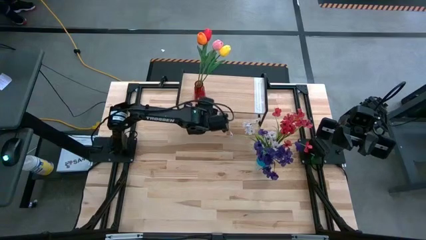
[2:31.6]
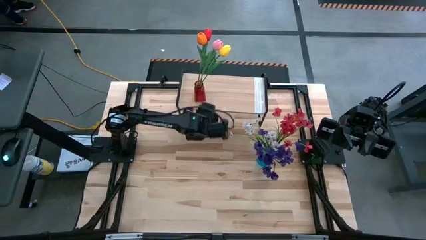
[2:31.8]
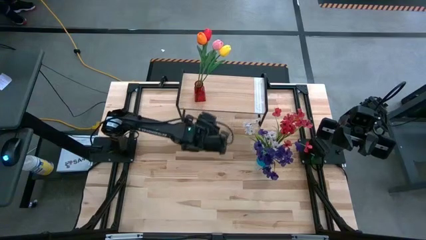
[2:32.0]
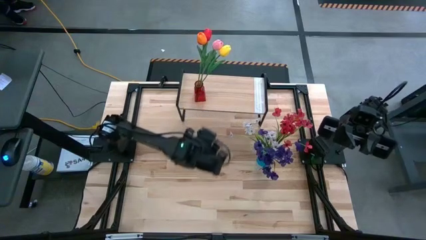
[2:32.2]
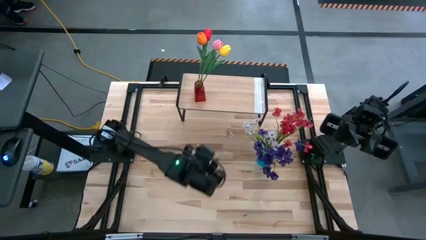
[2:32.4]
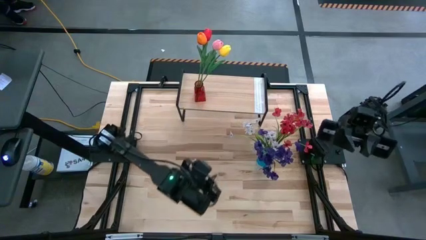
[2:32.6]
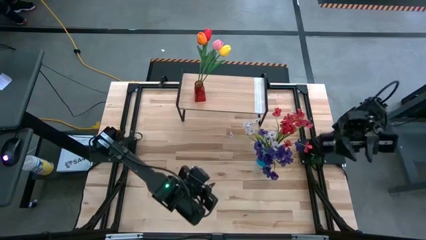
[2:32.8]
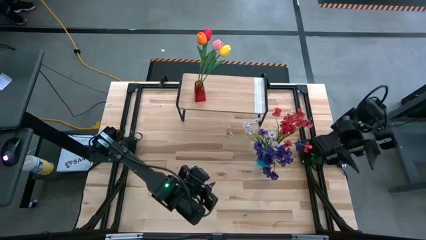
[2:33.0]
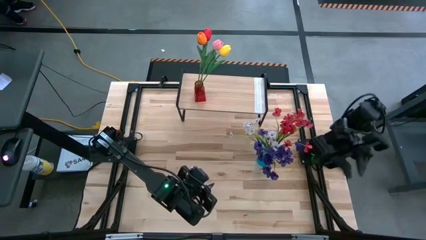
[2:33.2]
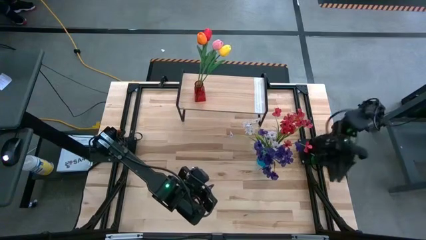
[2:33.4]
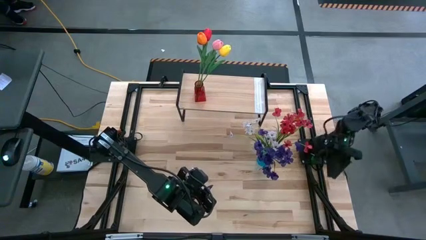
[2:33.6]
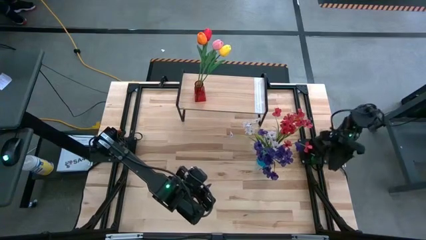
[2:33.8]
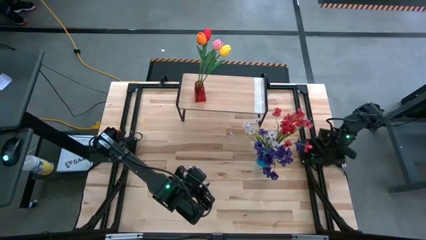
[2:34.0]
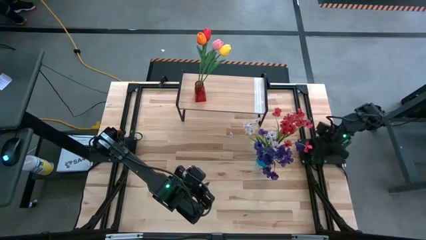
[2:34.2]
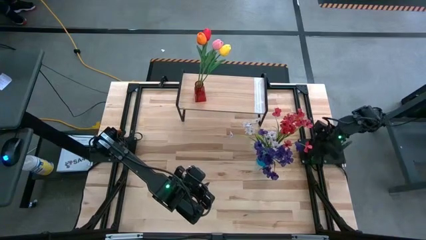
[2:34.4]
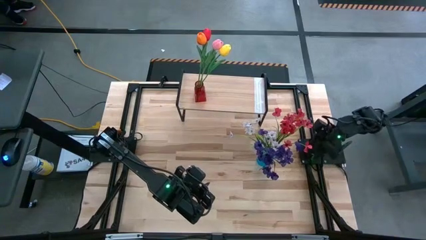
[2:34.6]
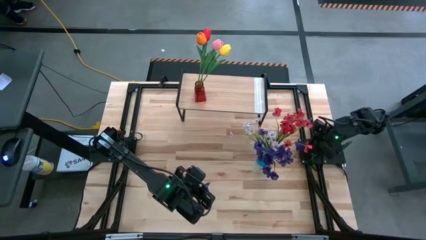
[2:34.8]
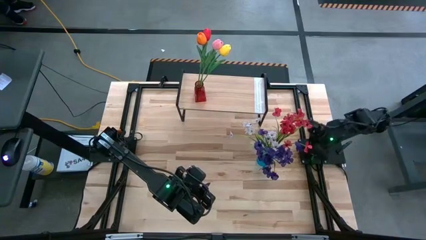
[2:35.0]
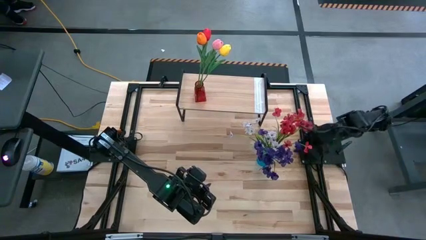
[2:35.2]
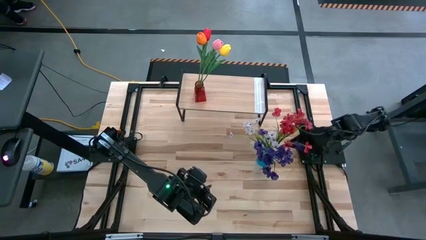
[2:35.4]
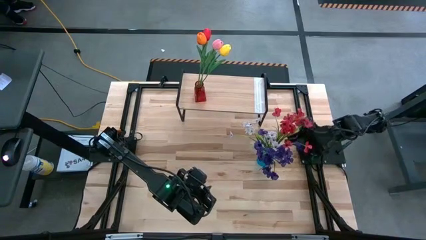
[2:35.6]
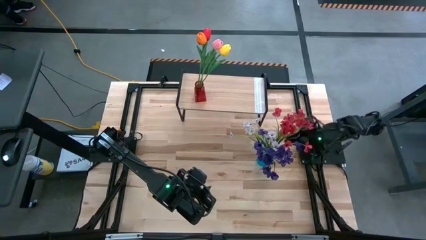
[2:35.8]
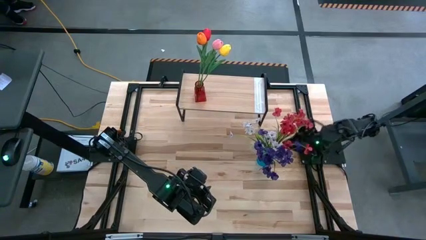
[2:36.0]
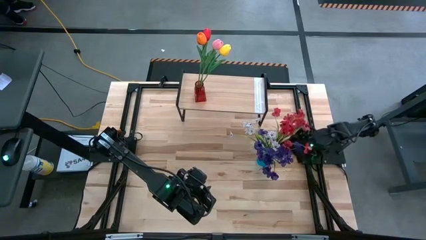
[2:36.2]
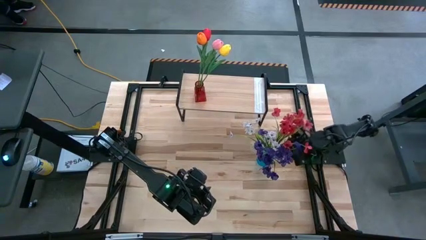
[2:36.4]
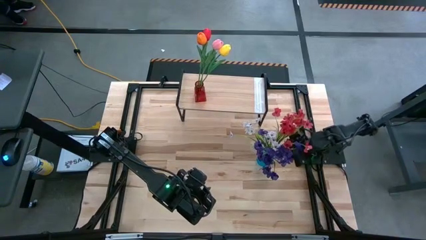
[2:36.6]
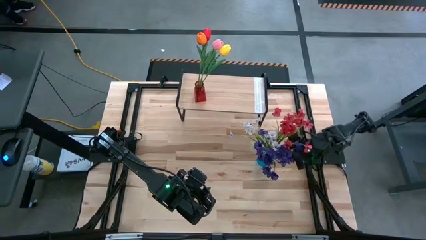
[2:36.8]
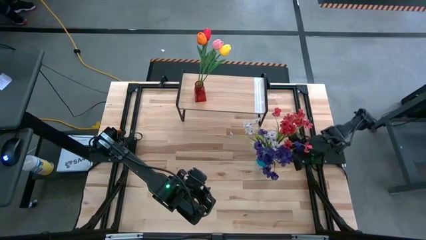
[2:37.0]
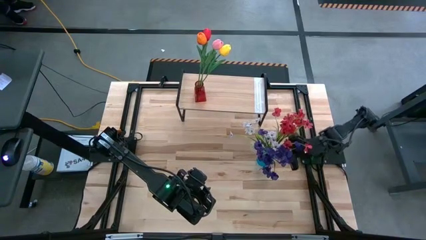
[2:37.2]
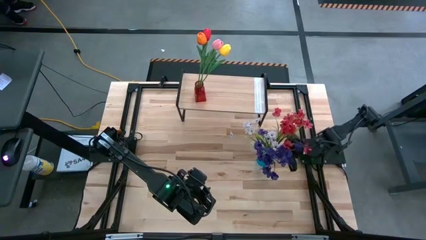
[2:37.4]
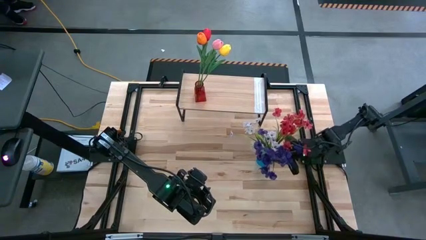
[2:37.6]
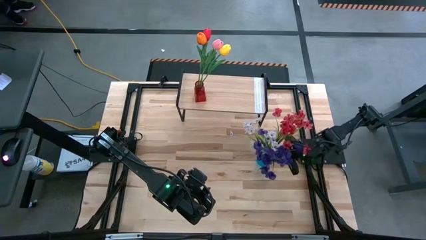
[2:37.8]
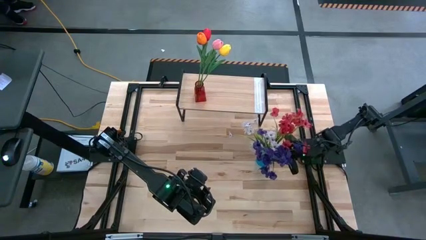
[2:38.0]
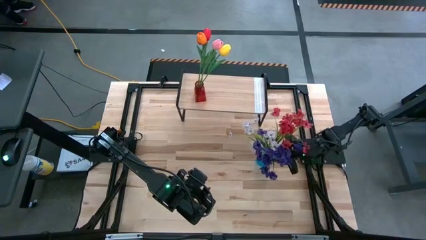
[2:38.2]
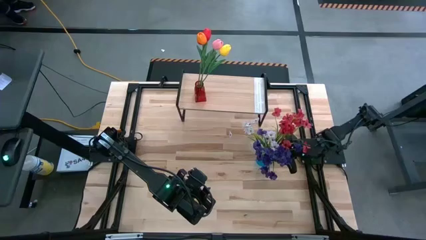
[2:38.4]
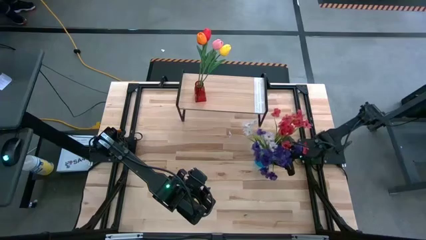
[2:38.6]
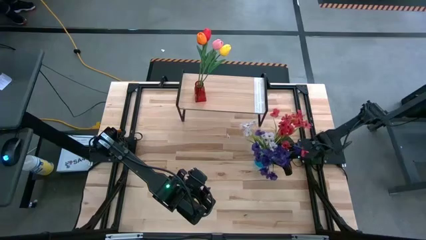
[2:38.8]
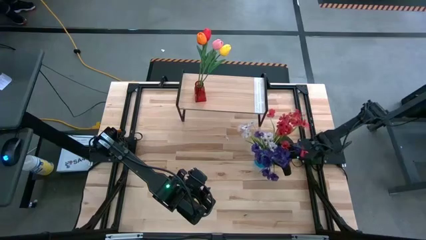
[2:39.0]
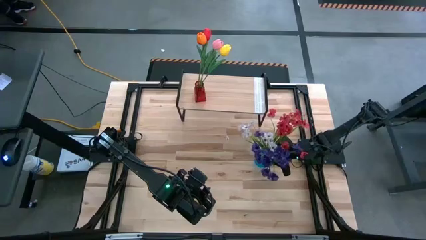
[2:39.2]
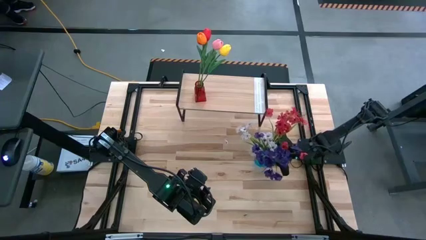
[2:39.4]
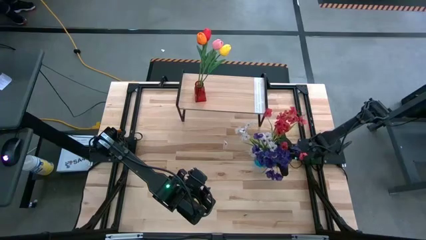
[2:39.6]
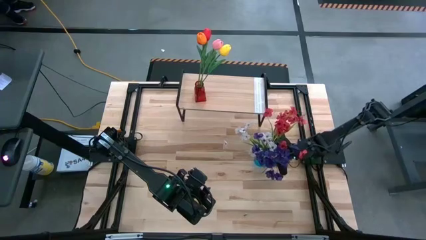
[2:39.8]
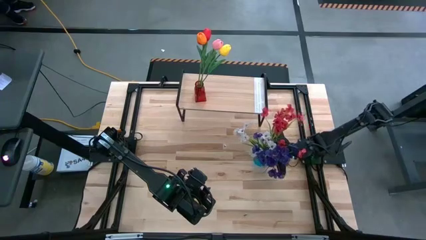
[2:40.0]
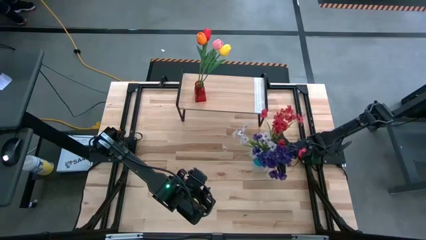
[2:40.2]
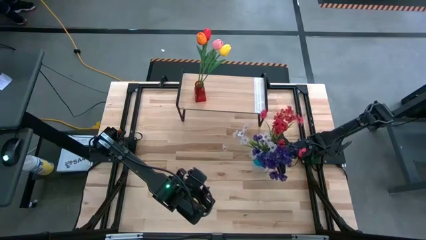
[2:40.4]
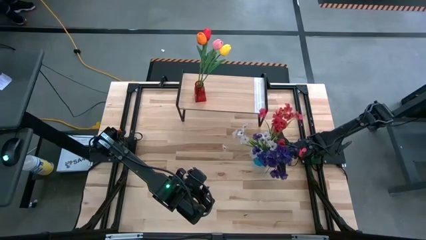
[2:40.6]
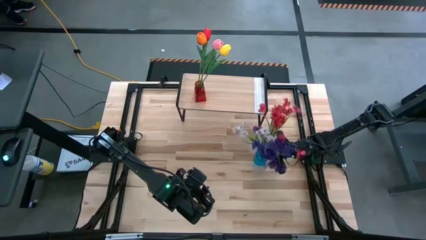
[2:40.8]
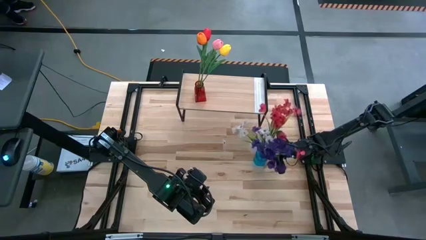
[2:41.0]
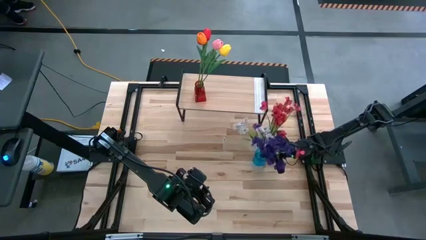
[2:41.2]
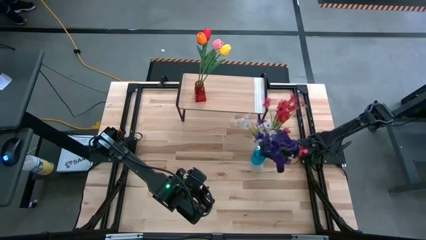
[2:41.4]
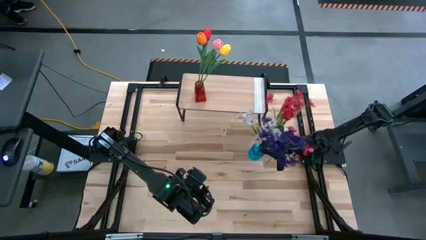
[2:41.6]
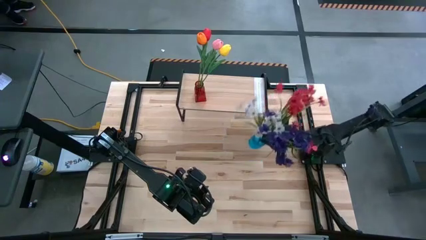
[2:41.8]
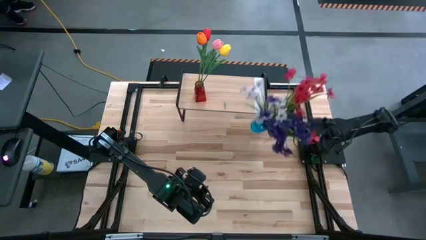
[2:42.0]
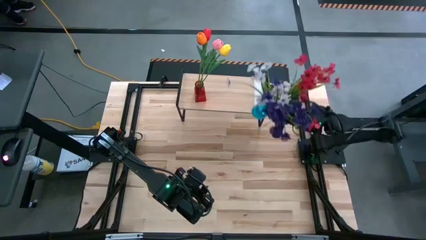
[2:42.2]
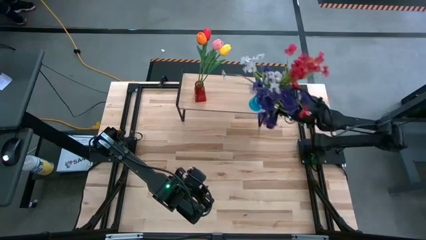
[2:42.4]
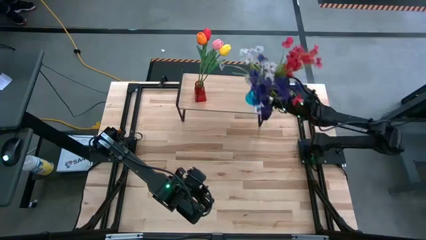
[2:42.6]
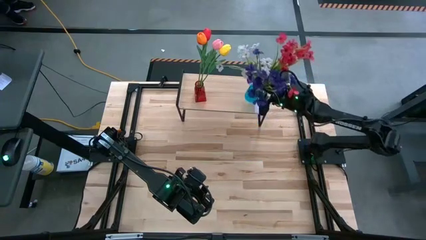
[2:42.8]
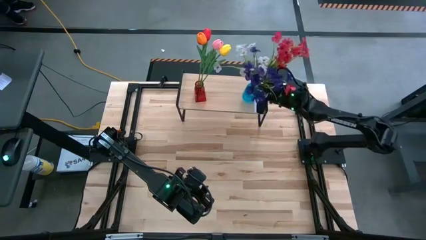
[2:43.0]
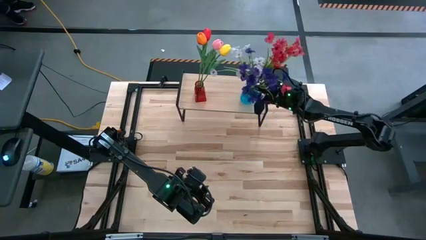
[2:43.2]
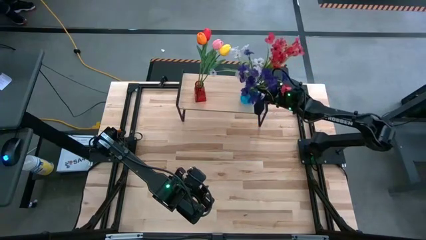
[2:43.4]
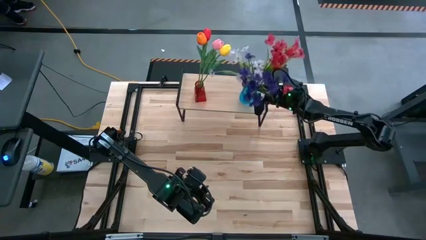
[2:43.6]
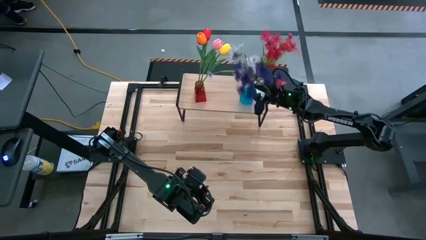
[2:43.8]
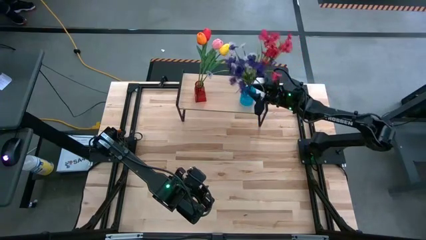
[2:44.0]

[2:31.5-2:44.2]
Task: Pick and place flowers into a vace then onto a shelf
Put the blue vase with flowers on the shelf
